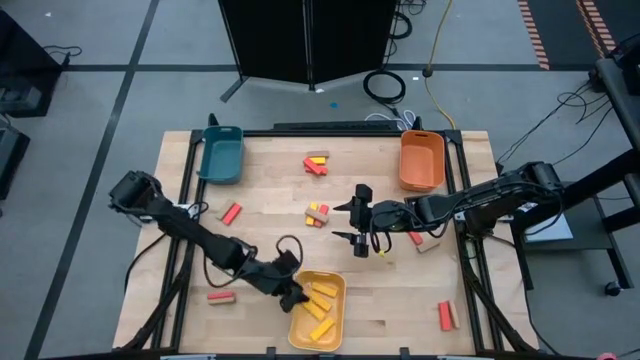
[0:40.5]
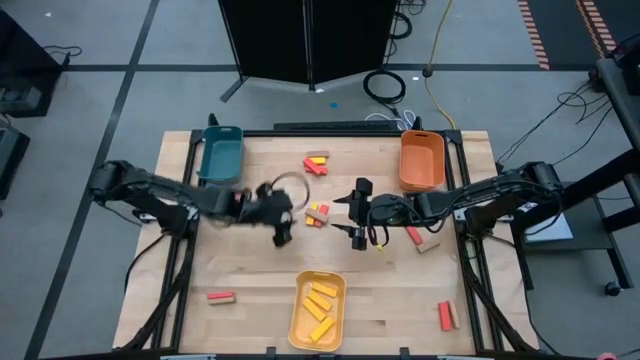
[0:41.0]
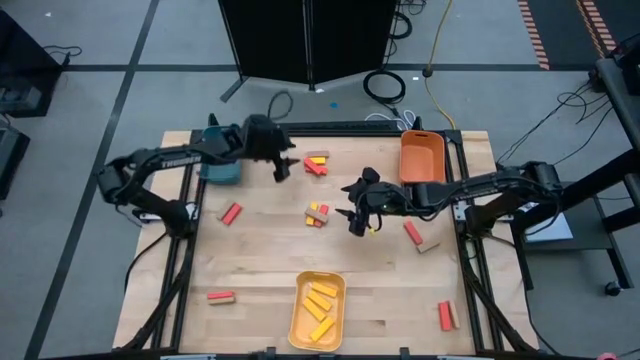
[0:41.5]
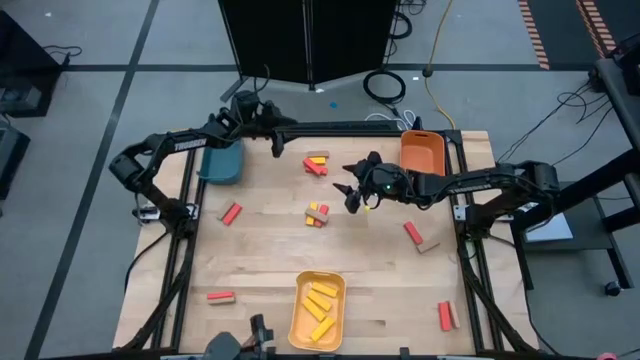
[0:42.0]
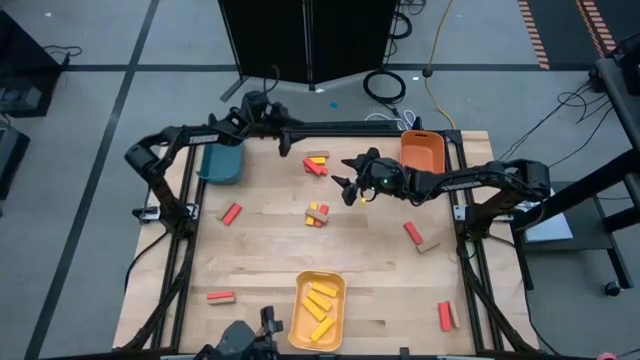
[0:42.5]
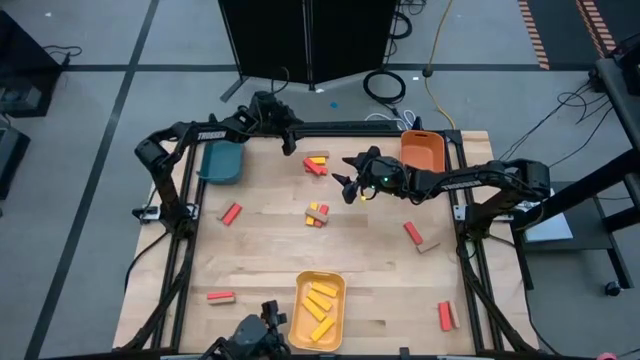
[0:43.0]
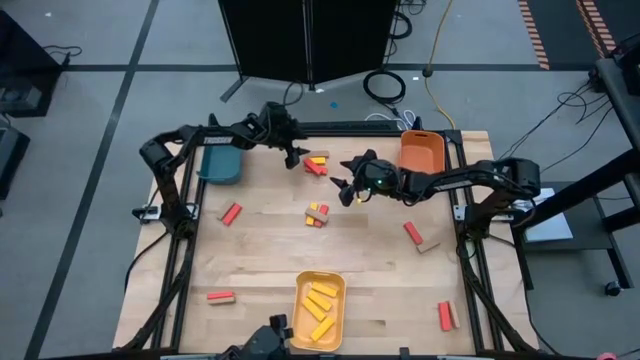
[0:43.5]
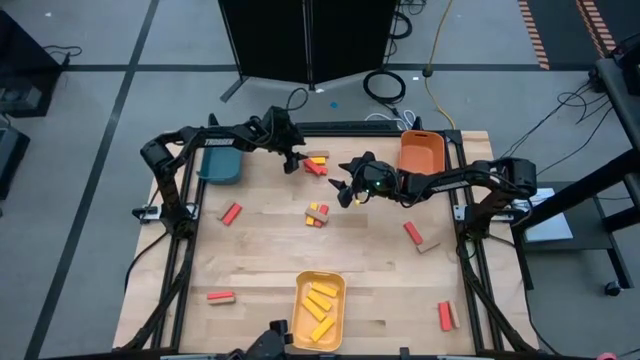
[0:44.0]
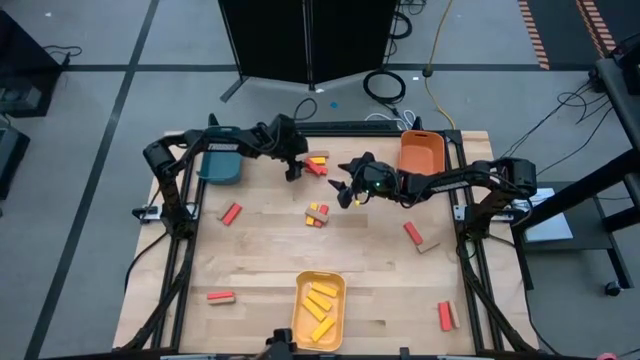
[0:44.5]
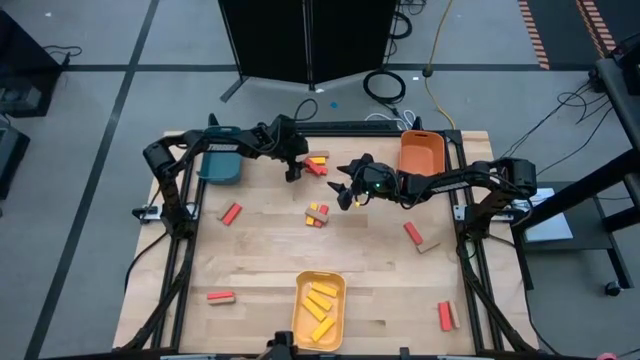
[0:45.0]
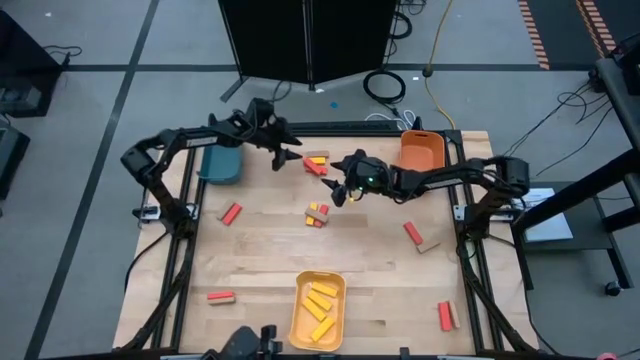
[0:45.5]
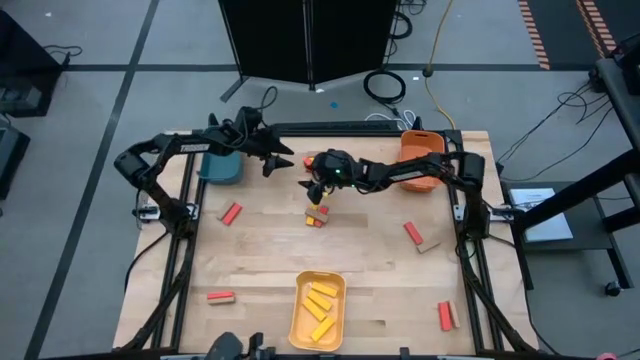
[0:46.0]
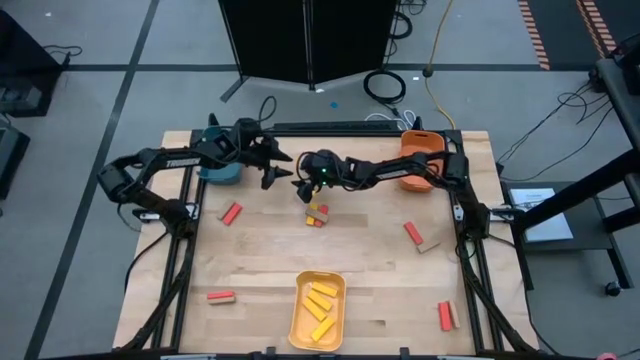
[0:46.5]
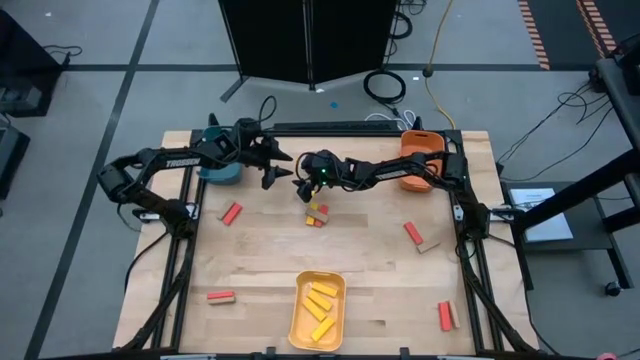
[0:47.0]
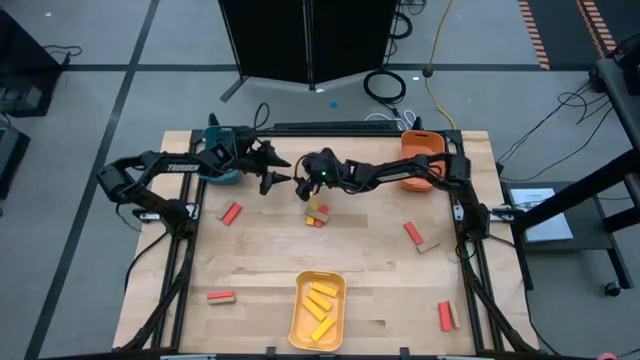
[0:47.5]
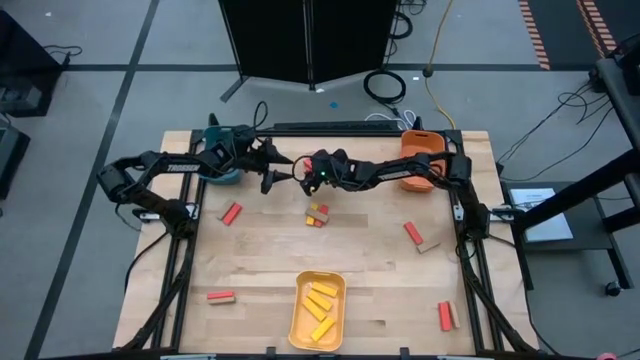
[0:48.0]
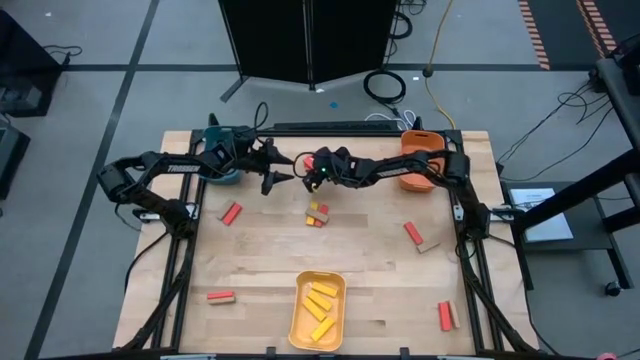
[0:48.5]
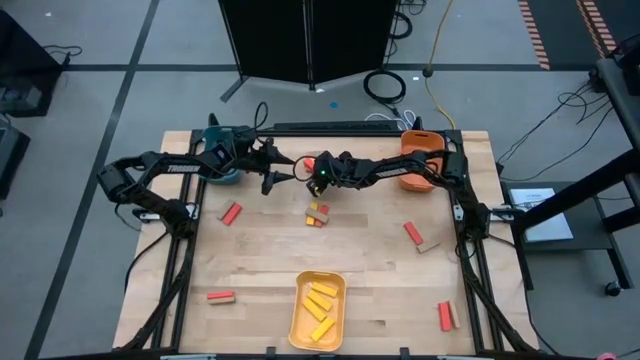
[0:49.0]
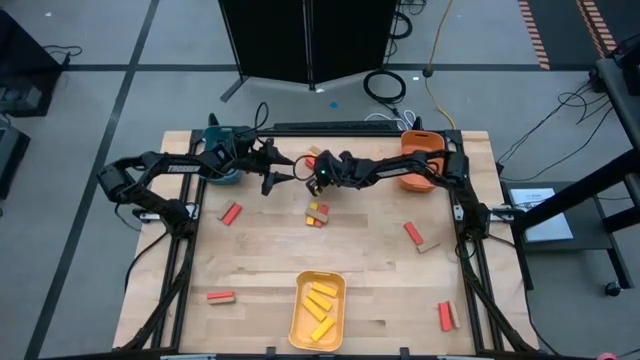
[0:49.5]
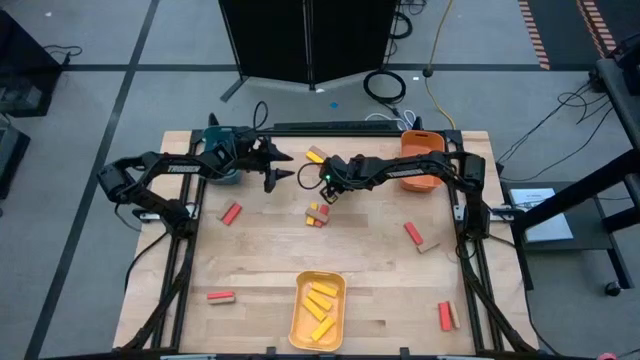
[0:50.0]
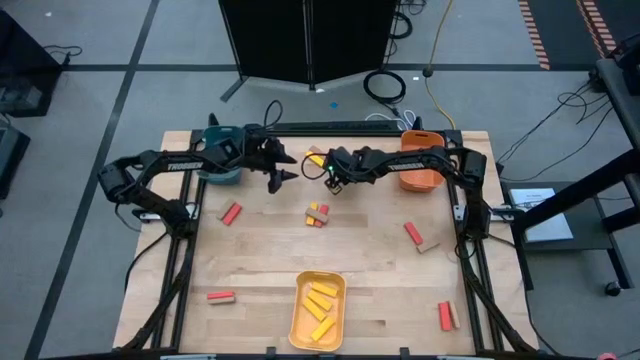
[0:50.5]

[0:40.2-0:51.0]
Task: Sort blocks
Put the red block into the orange bin

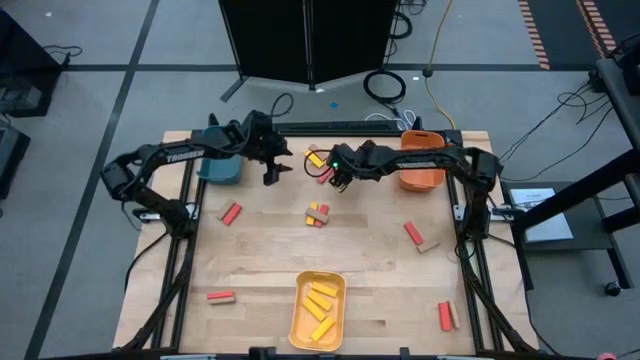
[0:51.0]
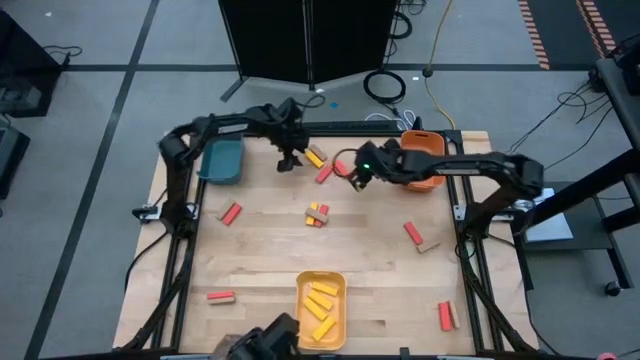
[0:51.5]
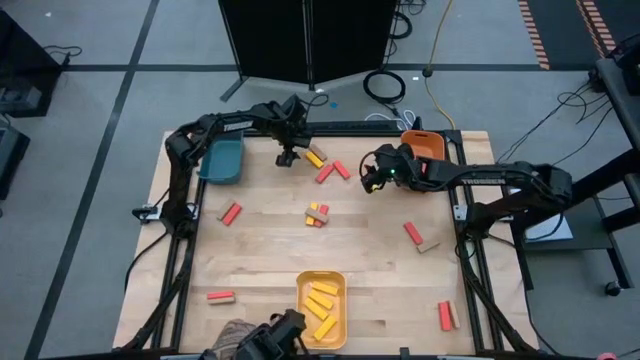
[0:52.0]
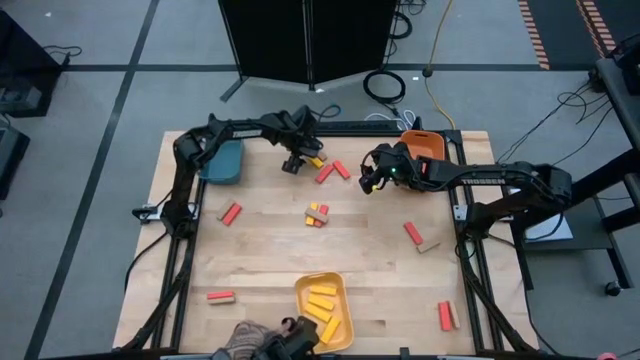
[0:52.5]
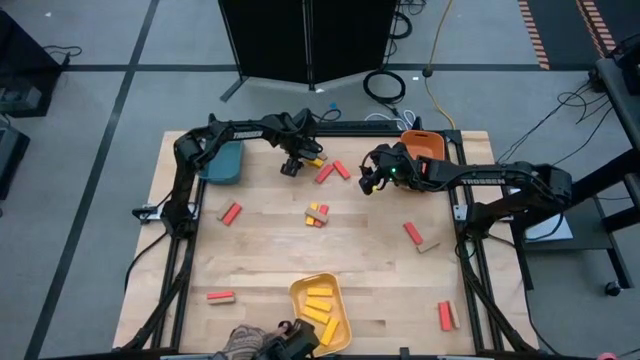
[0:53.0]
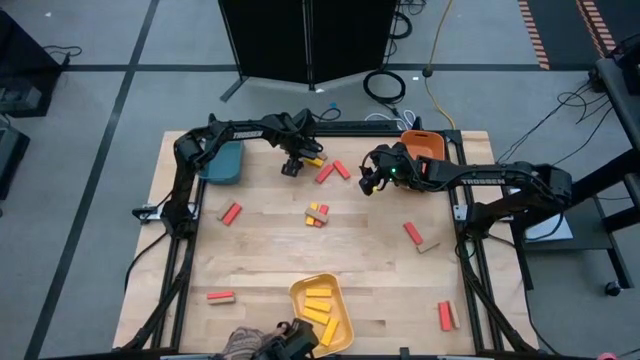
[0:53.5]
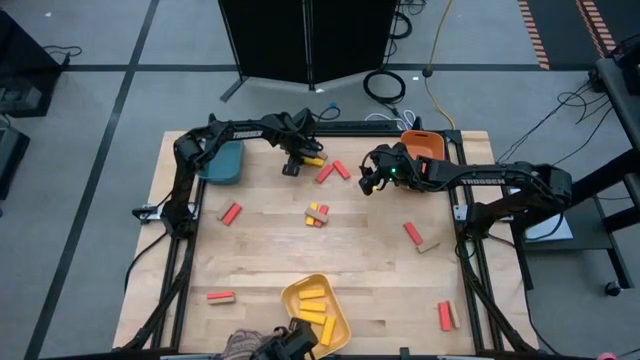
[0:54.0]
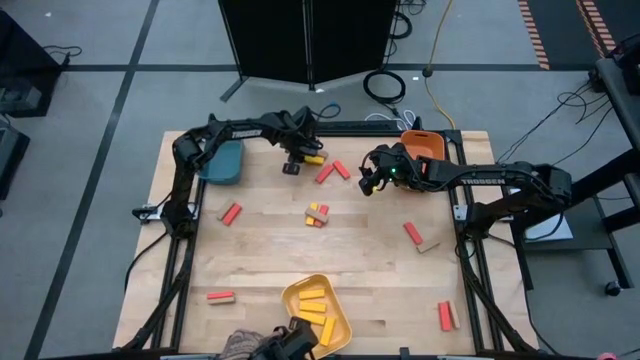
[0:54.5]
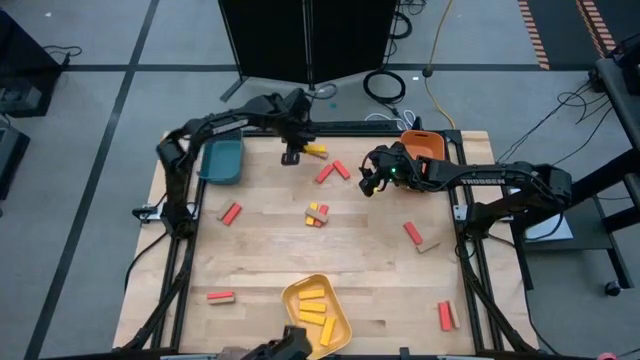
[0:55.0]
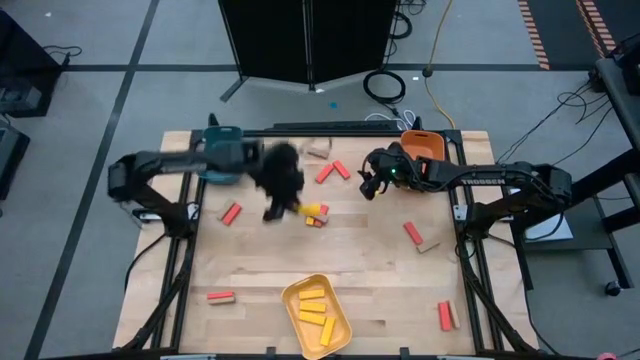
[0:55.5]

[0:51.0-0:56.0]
Put the yellow block into the yellow bin

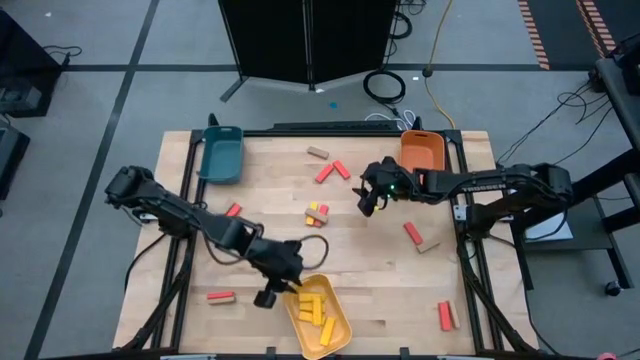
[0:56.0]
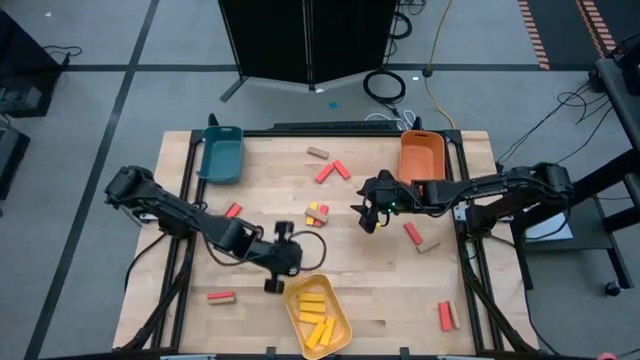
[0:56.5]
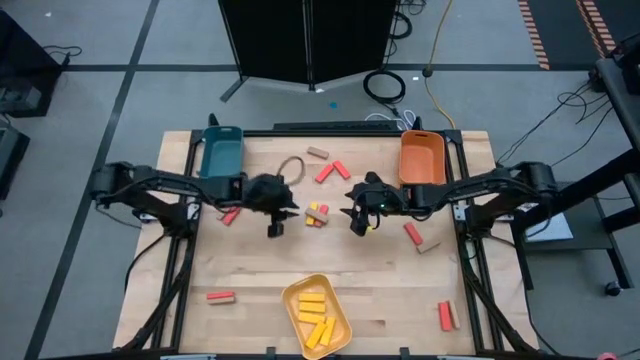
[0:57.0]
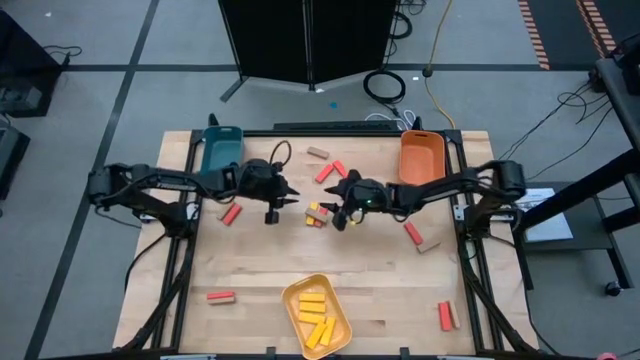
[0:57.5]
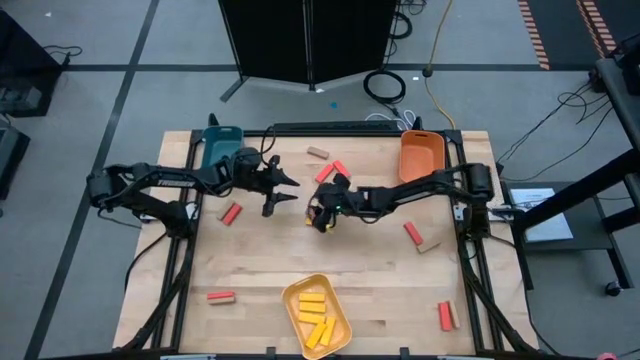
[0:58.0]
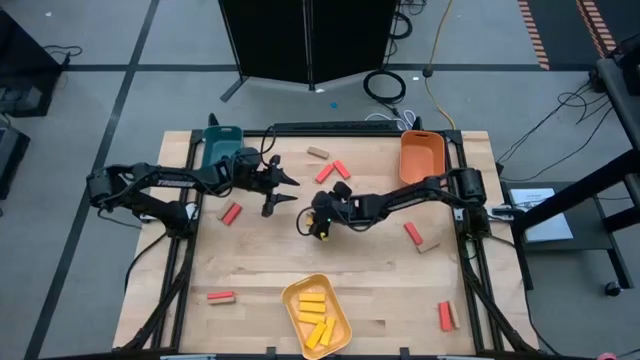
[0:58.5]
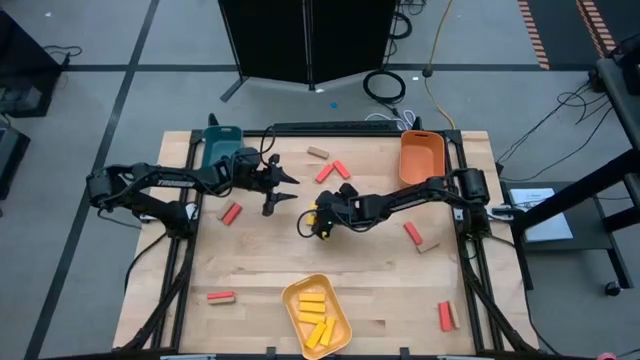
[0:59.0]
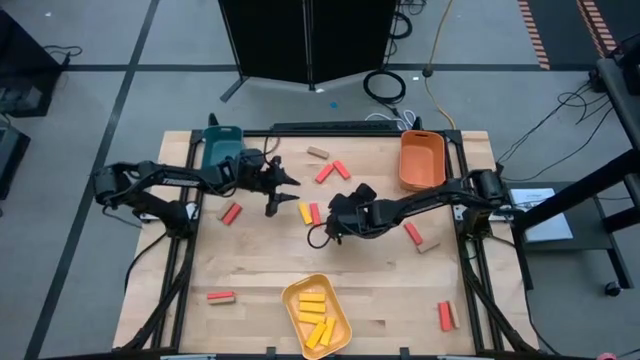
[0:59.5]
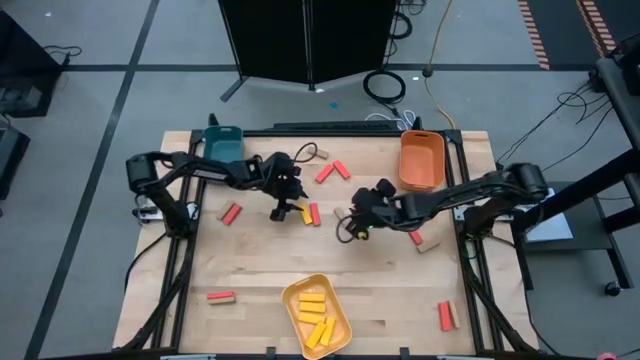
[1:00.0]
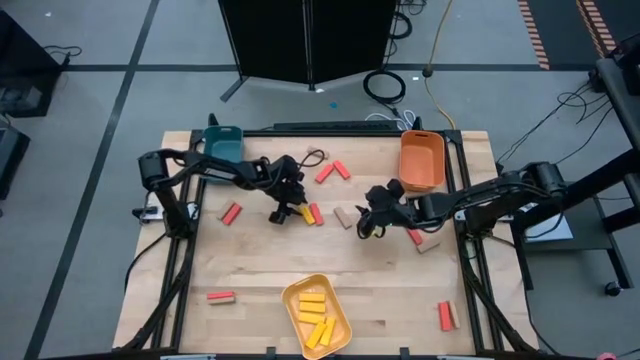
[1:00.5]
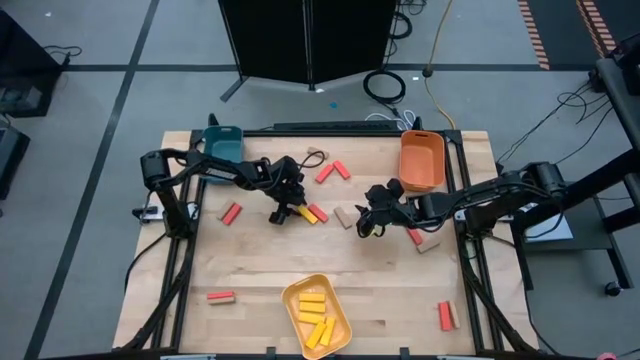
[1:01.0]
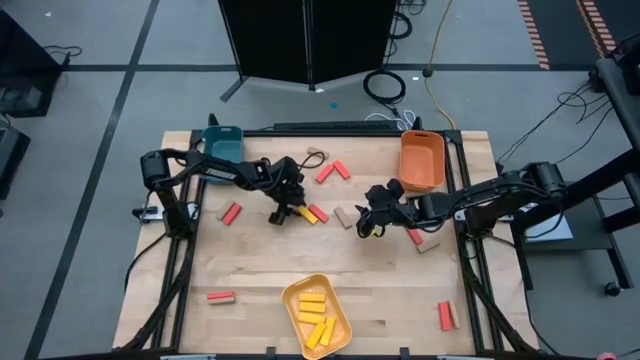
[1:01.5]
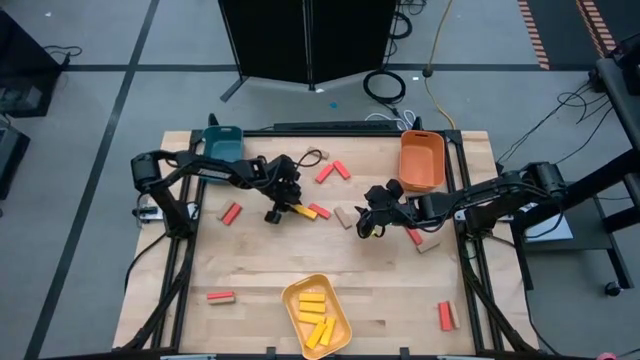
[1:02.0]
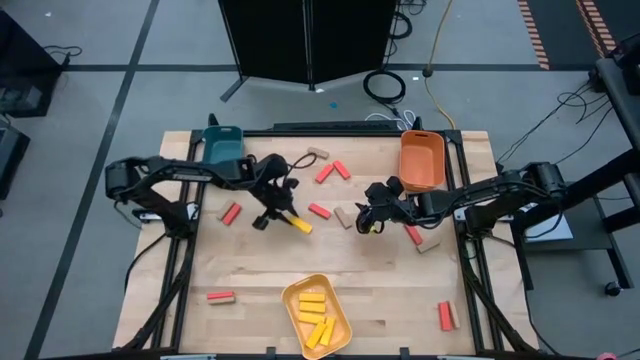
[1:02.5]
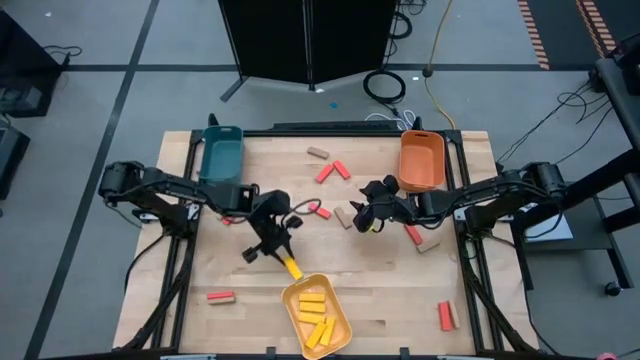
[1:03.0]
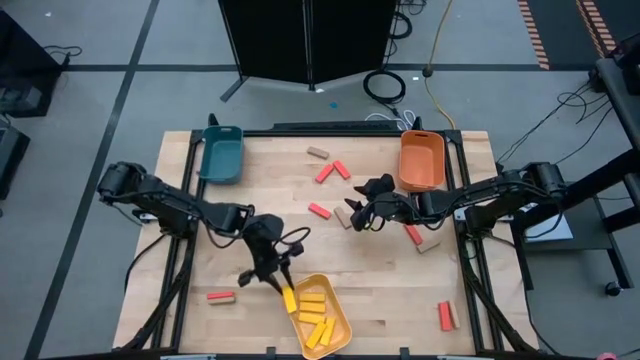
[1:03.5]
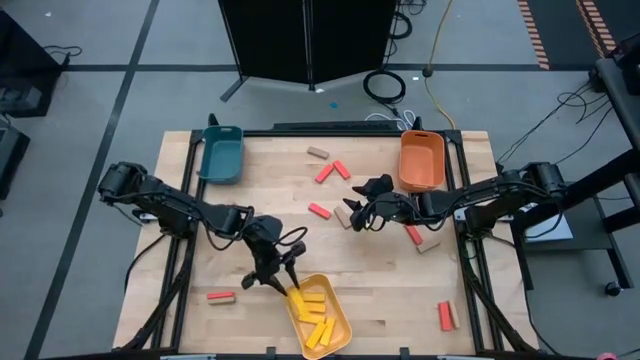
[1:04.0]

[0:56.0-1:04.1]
Put the yellow block into the yellow bin
